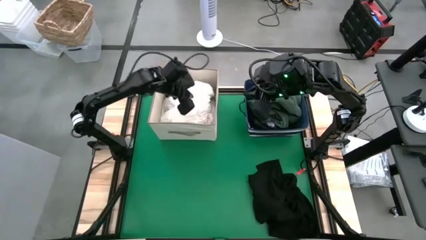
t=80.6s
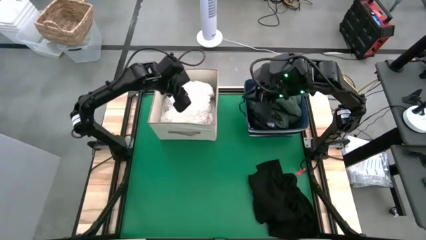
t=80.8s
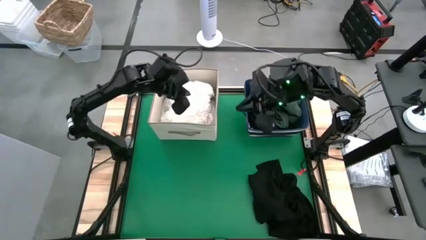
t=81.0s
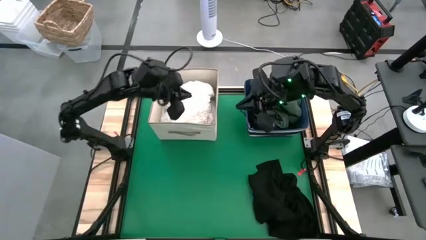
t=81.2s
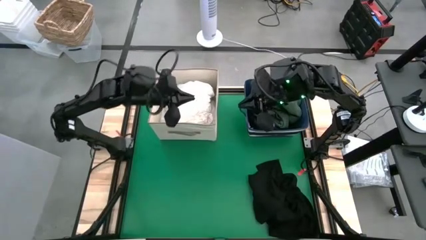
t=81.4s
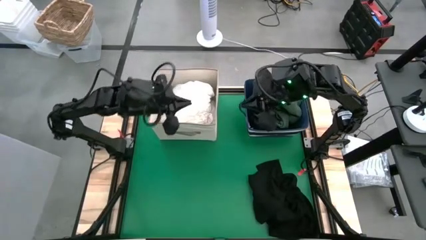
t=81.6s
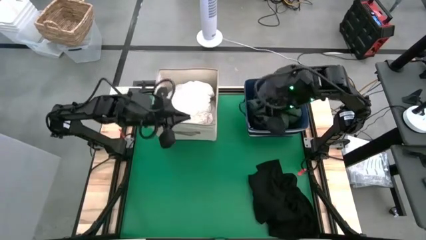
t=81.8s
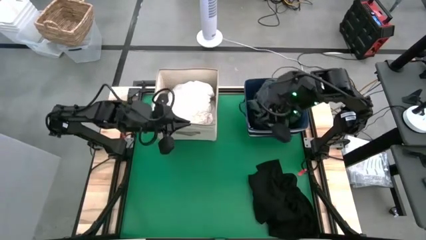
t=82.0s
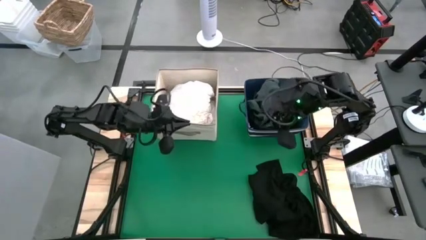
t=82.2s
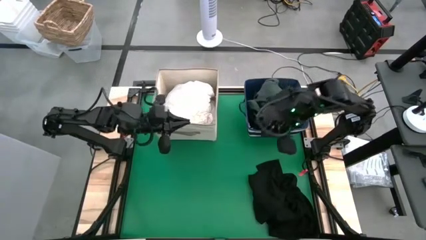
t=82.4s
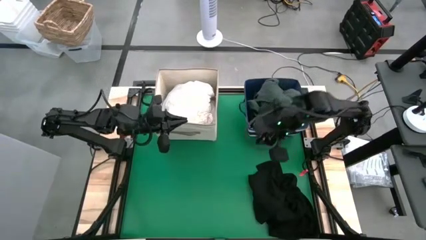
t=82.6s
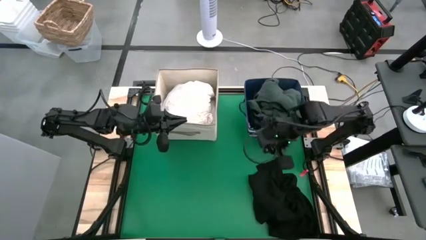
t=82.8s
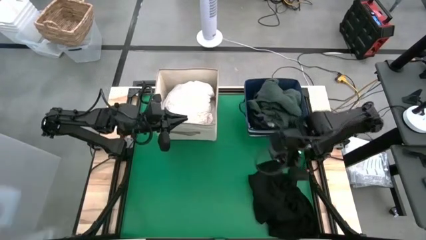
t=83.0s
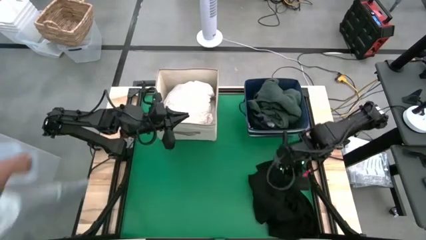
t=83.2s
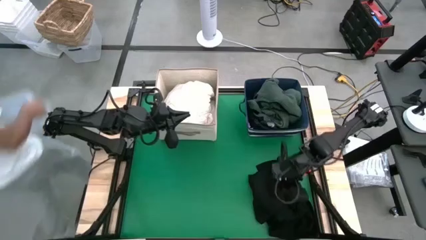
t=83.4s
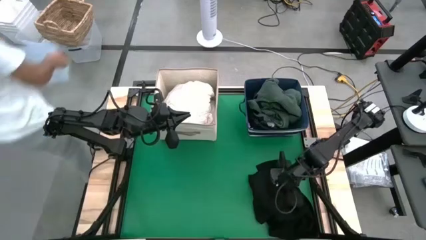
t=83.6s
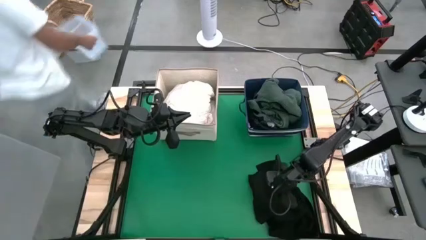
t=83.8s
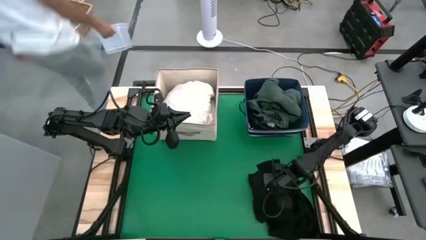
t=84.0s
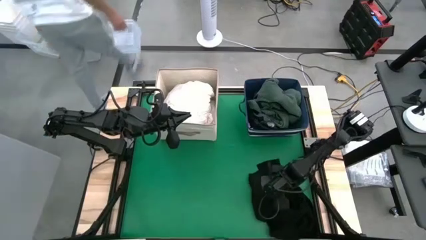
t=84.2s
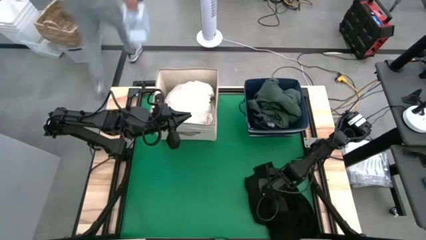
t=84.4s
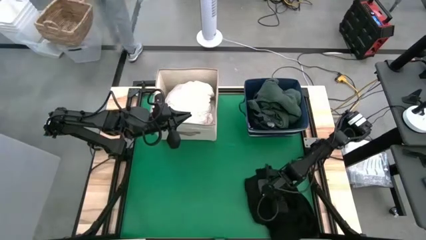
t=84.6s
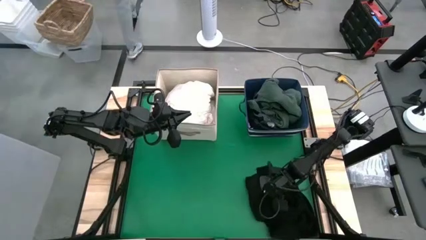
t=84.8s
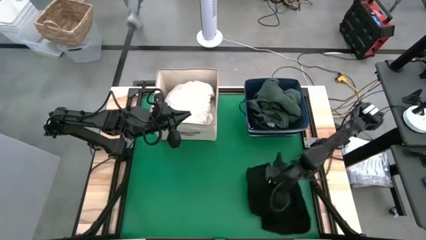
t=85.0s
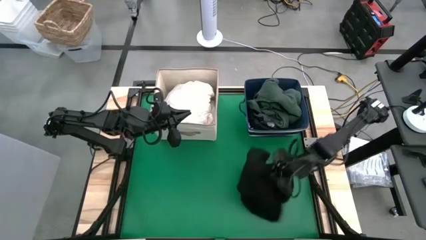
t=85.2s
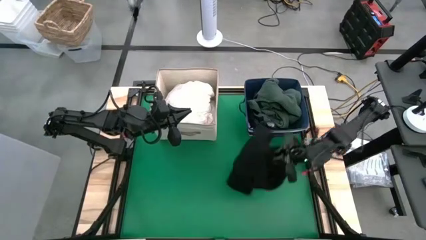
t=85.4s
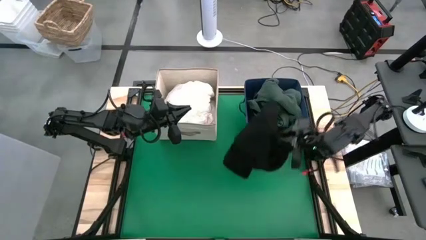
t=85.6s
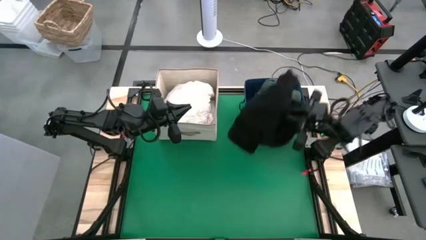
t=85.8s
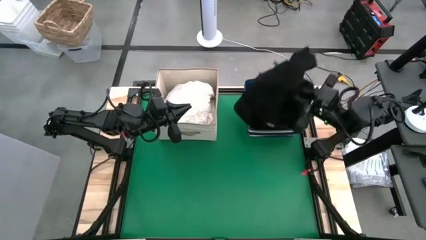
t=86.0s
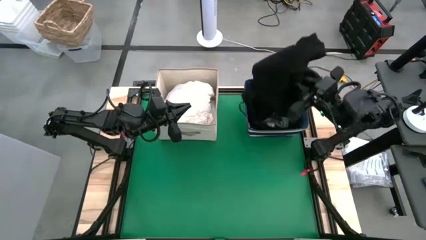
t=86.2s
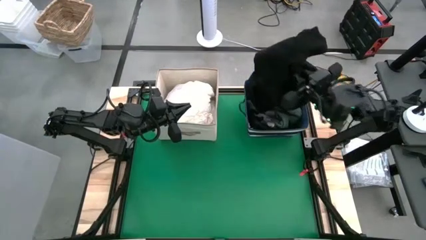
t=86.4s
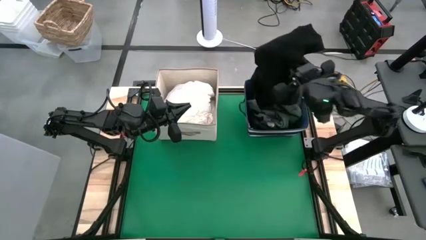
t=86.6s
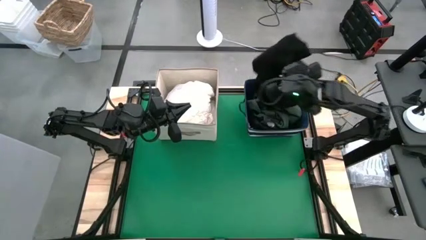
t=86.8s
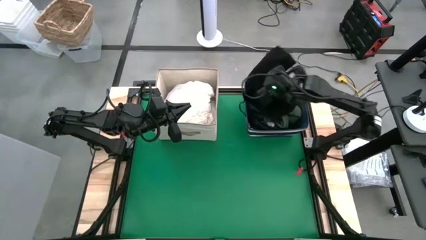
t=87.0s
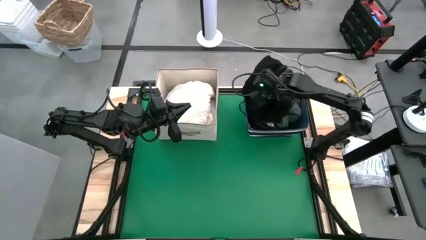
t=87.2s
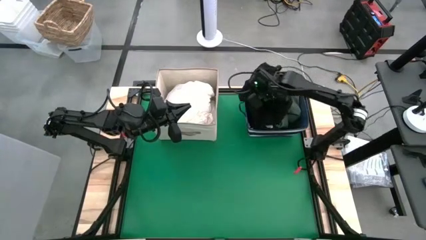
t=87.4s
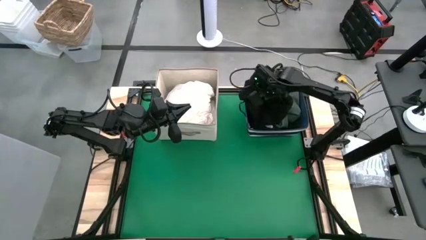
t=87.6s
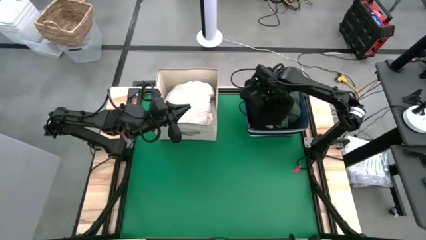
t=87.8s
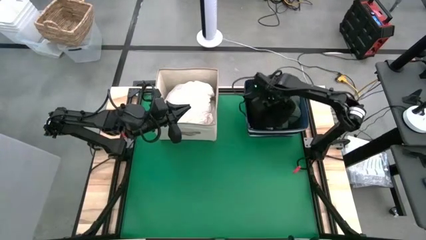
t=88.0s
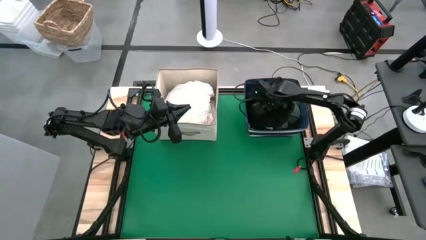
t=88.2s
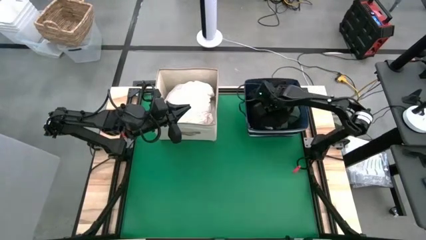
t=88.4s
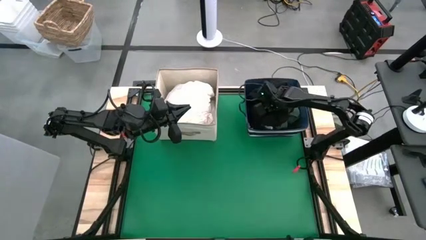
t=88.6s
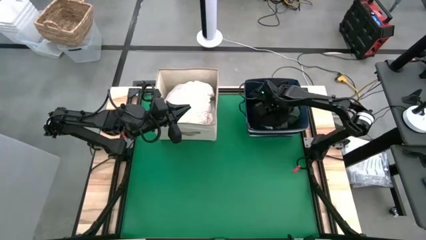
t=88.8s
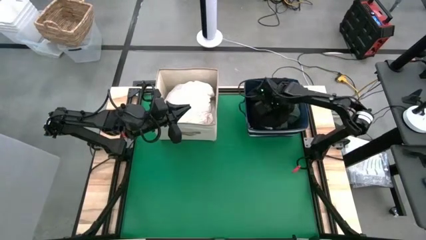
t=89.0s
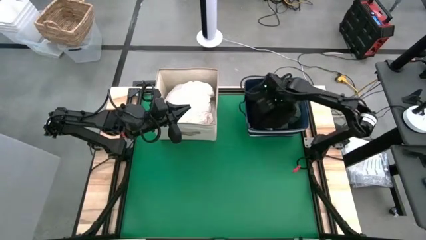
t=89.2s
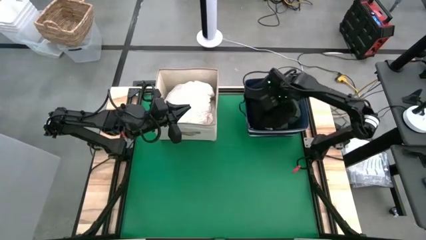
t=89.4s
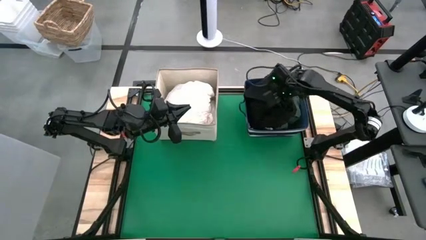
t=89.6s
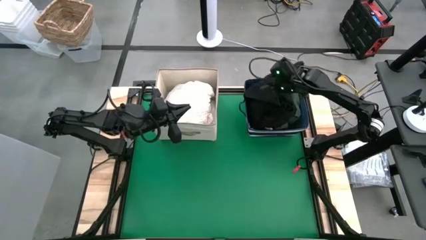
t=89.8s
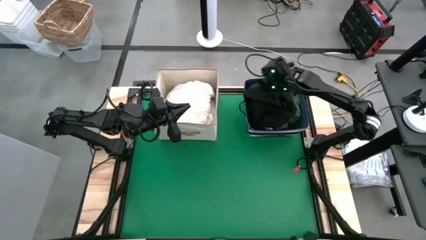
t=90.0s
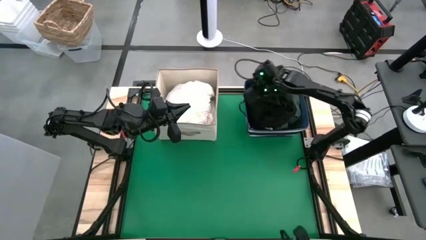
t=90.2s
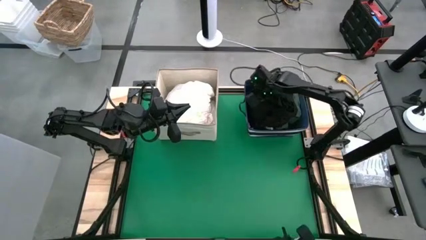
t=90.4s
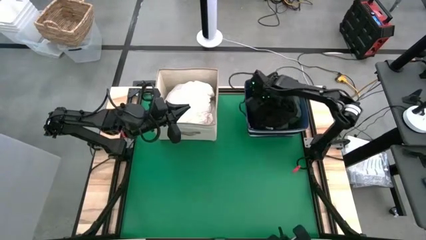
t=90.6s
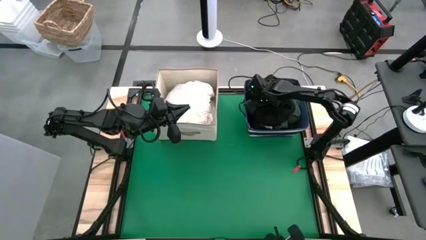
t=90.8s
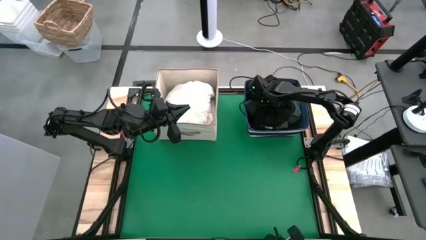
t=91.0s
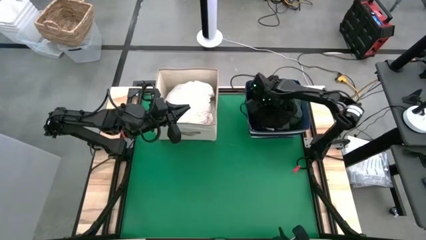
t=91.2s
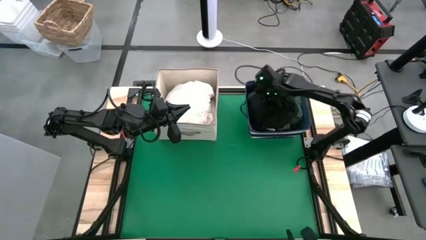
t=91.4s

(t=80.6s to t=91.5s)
Put the black shirt into the blue laundry bin
